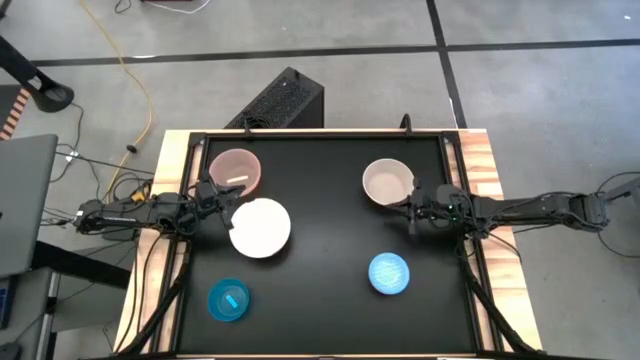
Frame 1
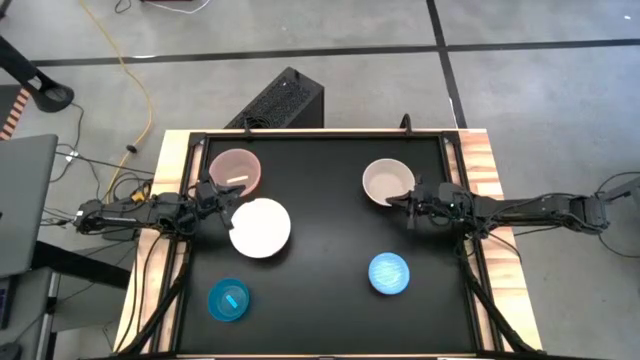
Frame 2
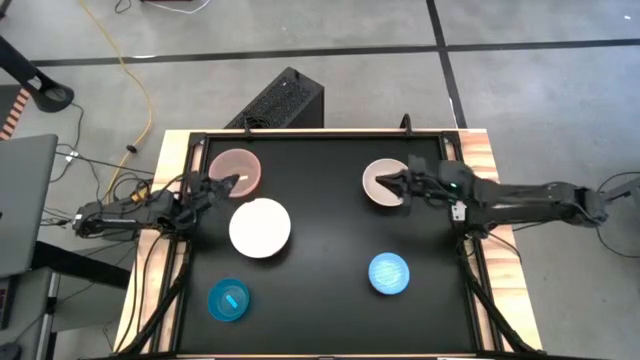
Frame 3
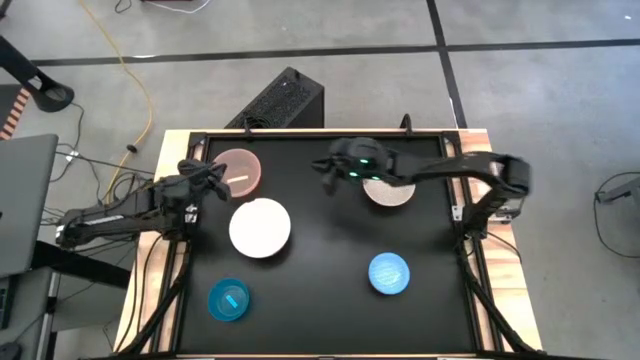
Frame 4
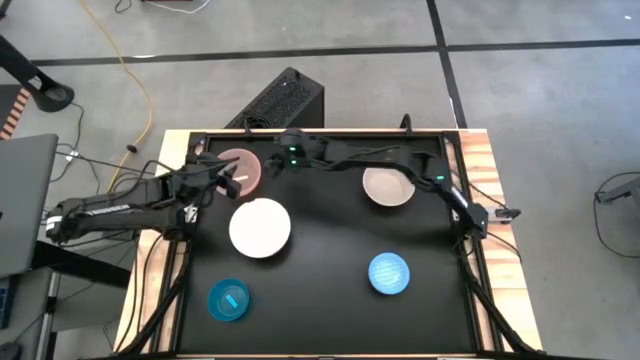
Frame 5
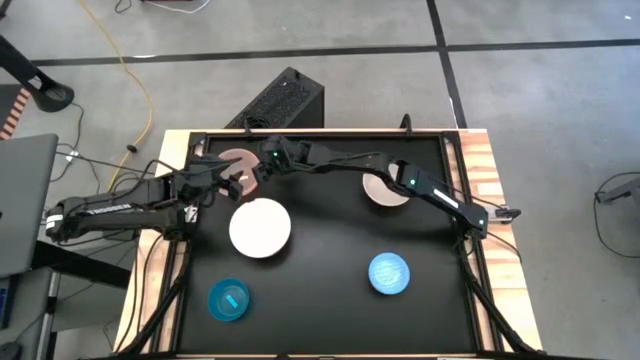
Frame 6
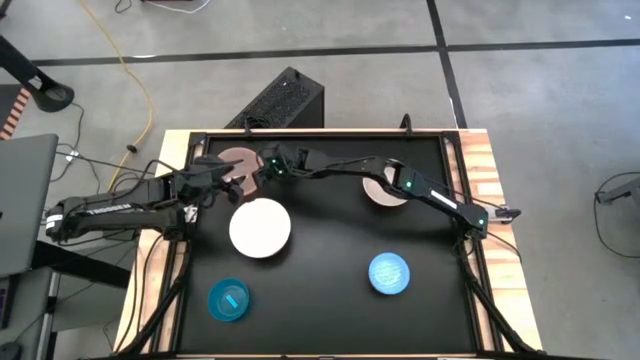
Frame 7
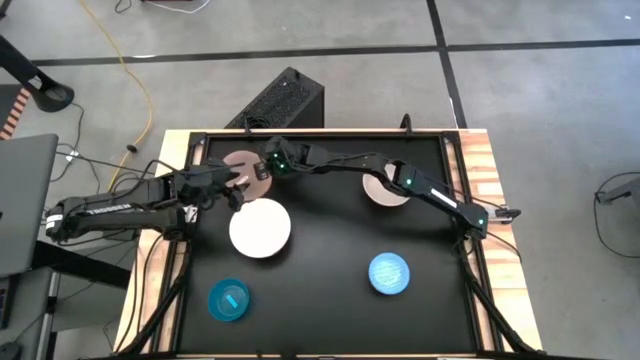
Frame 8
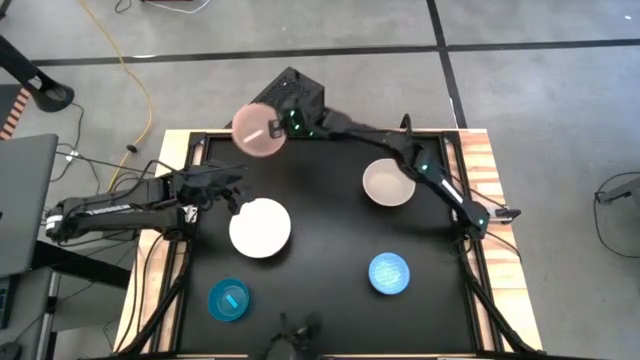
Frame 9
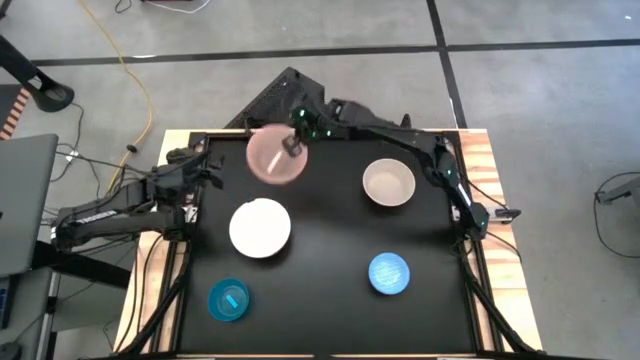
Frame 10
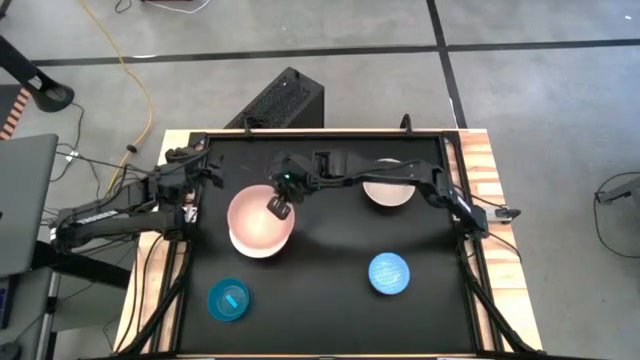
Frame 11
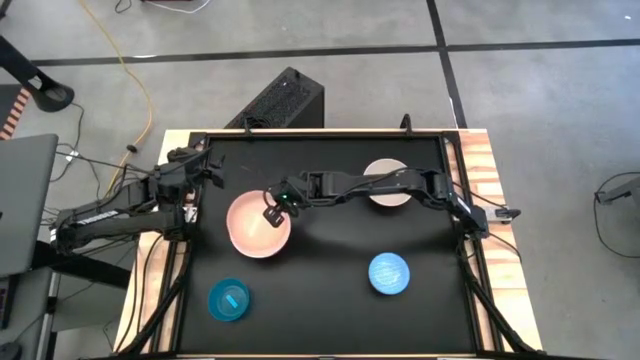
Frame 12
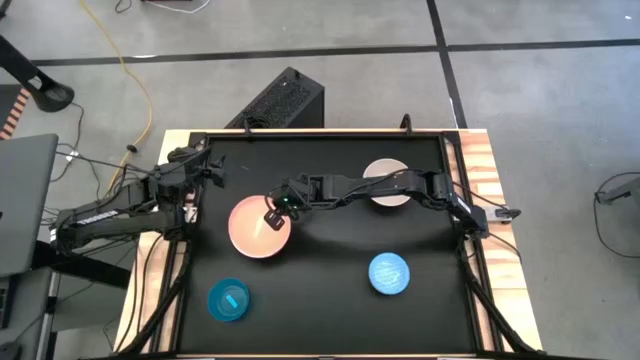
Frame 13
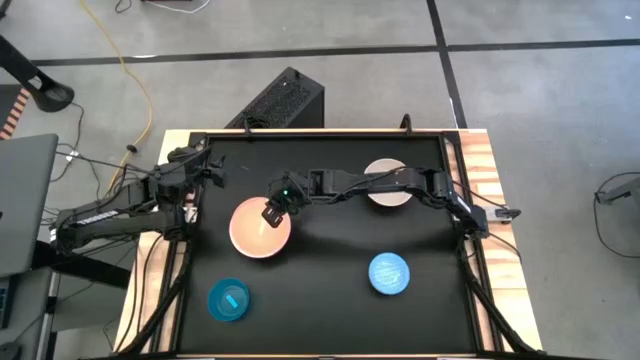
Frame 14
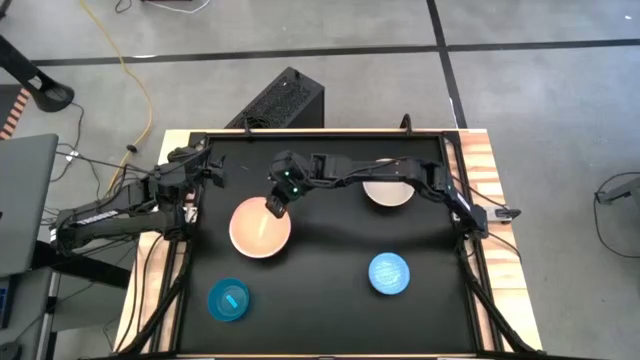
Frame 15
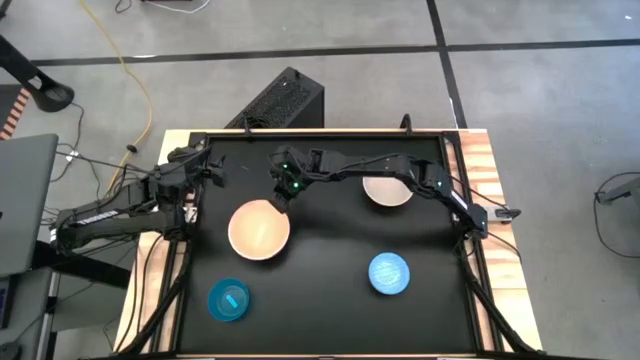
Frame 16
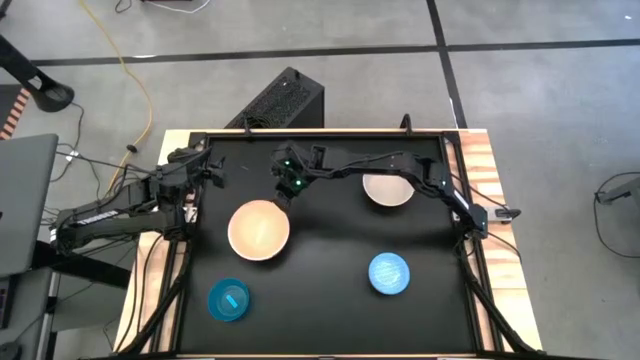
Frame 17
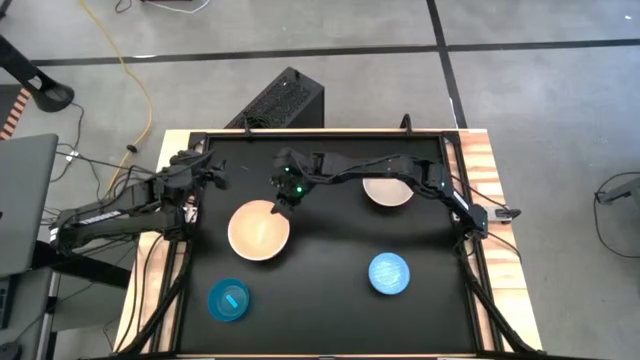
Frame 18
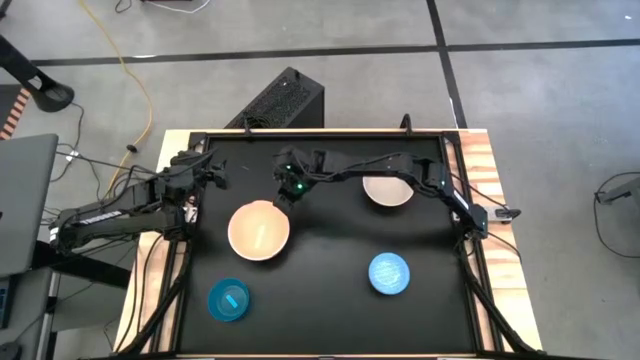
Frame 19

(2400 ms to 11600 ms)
Stack the pink bowl on top of the white bowl

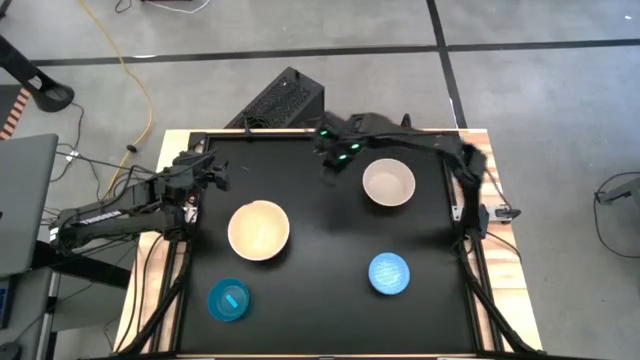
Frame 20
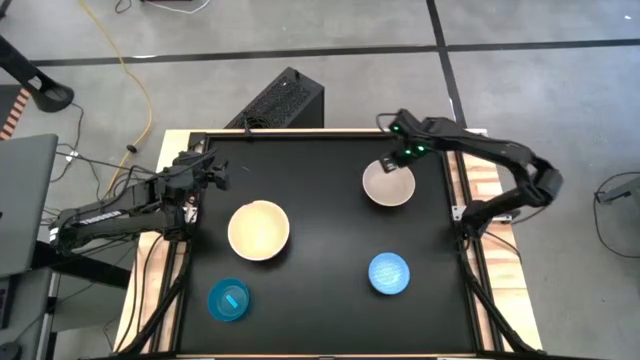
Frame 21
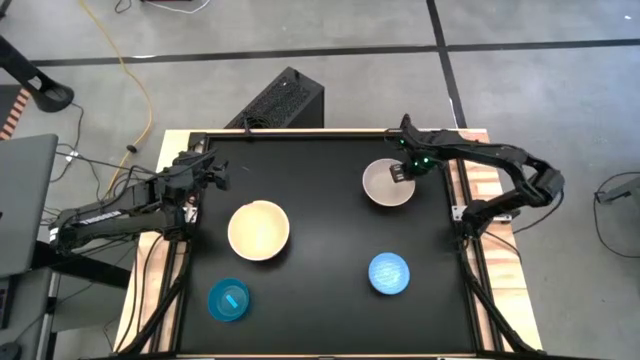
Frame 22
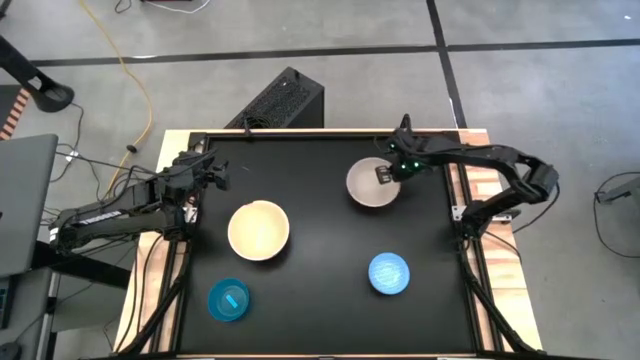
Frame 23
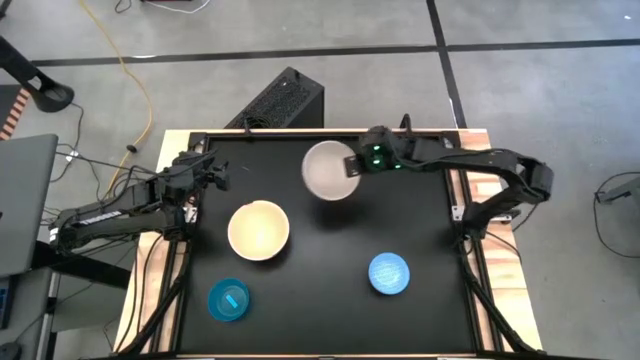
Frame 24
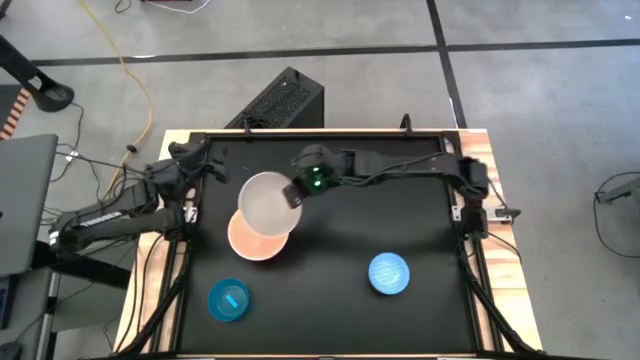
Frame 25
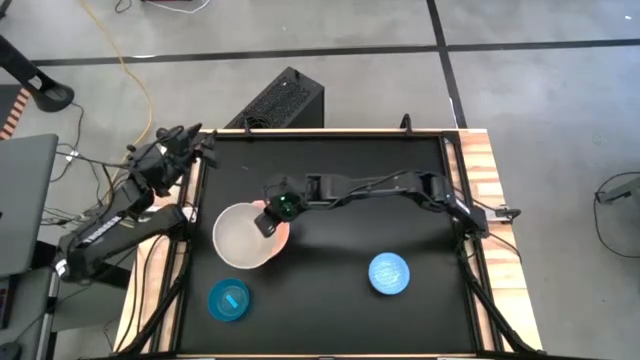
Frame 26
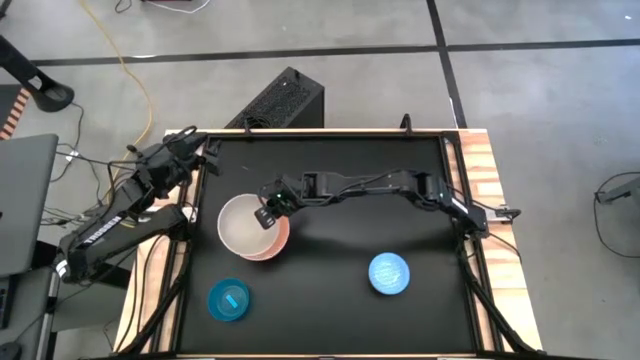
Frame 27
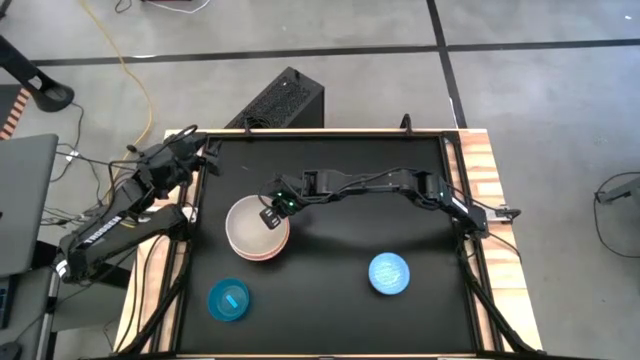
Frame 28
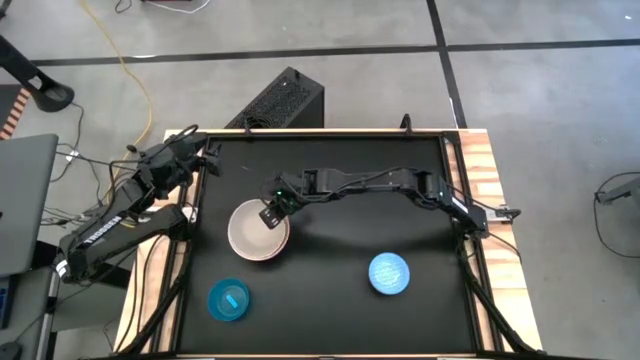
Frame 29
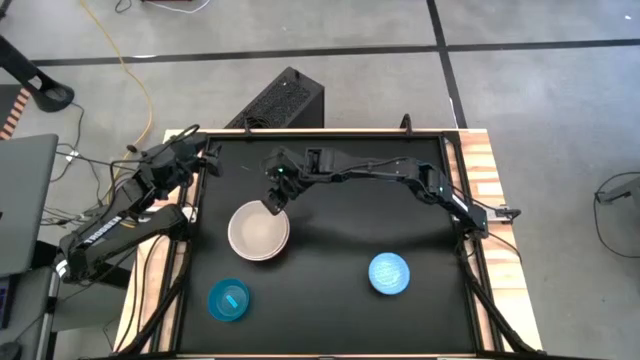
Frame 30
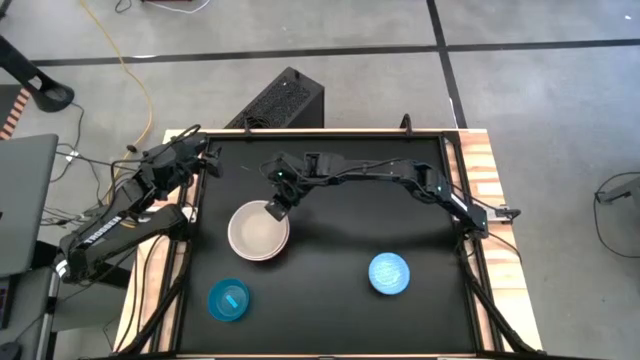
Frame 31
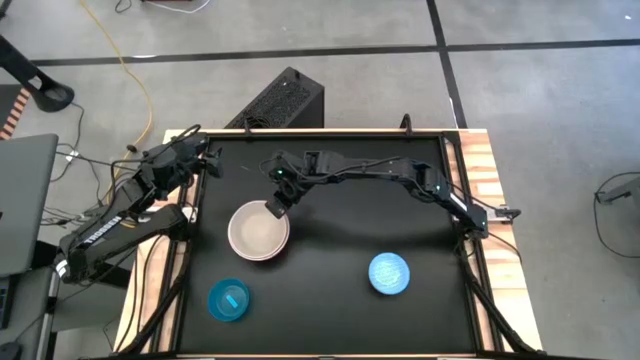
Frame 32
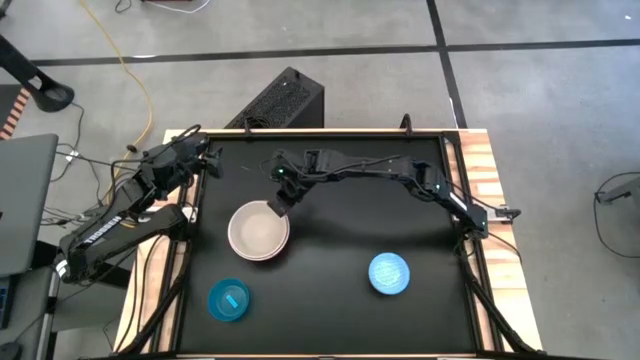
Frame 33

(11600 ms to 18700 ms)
Stack the light brown bowl on top of the pink bowl

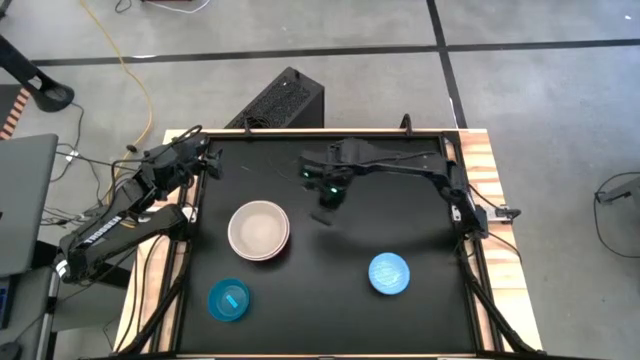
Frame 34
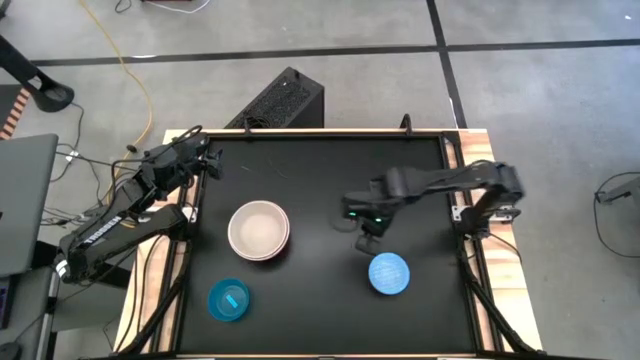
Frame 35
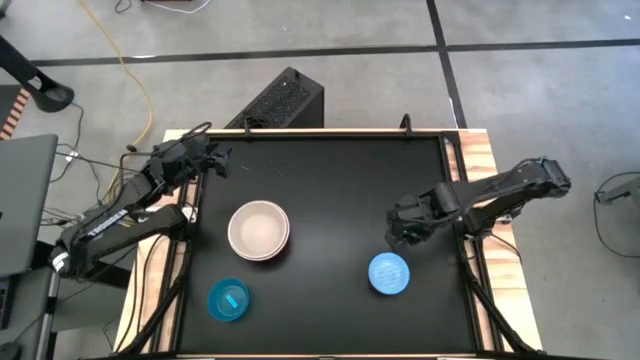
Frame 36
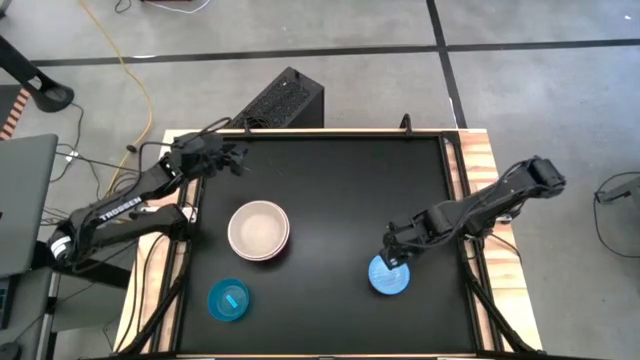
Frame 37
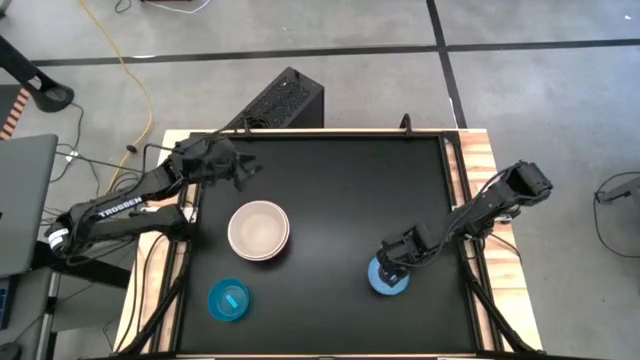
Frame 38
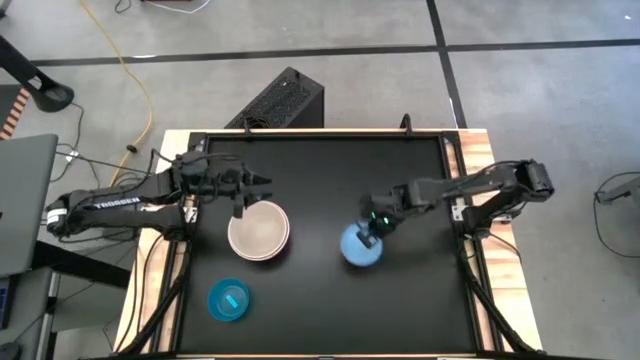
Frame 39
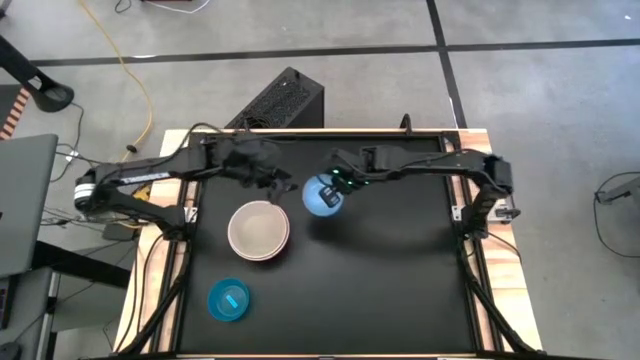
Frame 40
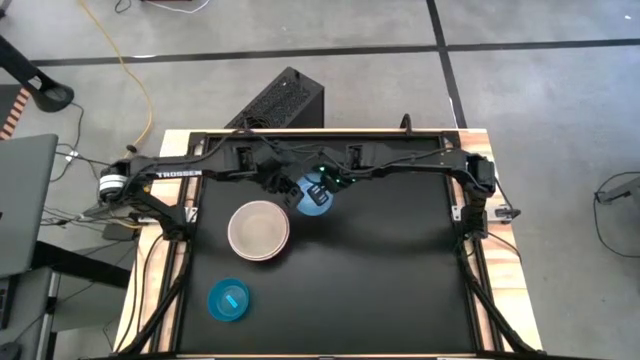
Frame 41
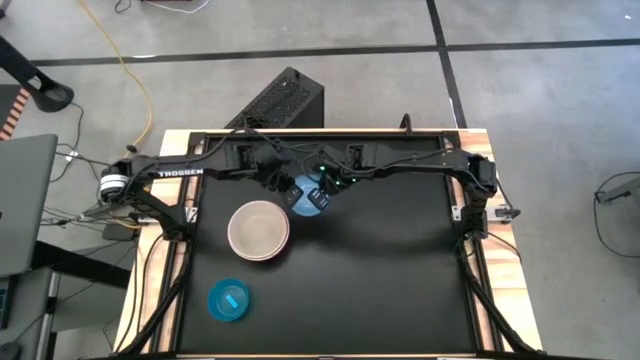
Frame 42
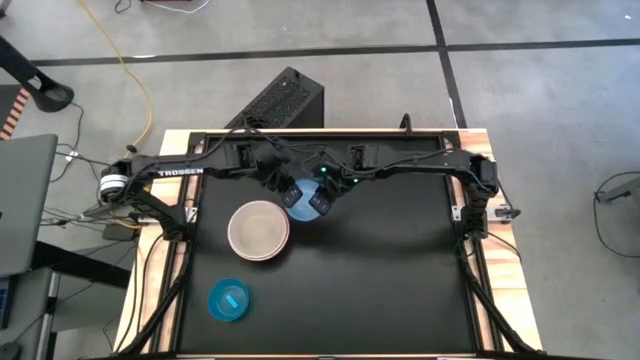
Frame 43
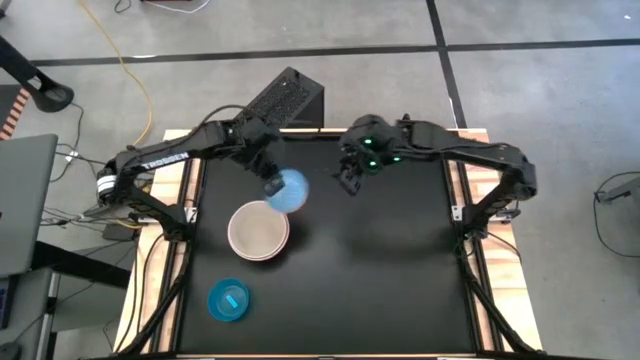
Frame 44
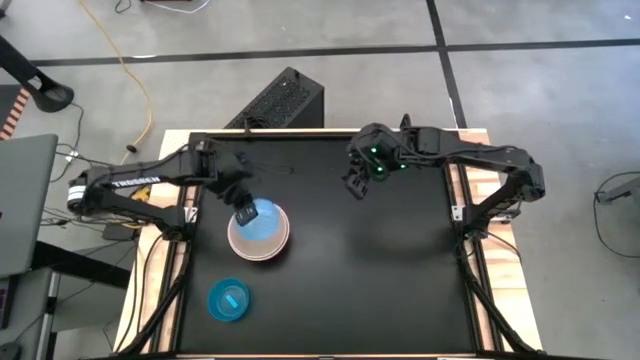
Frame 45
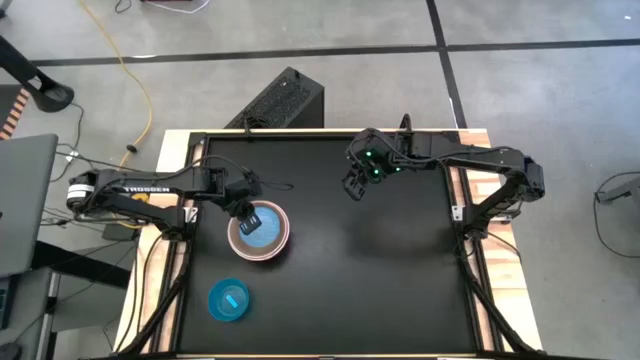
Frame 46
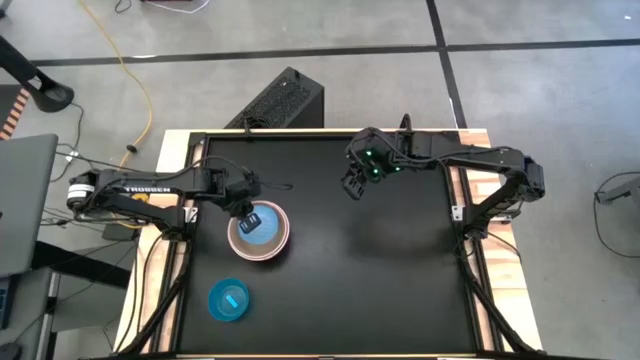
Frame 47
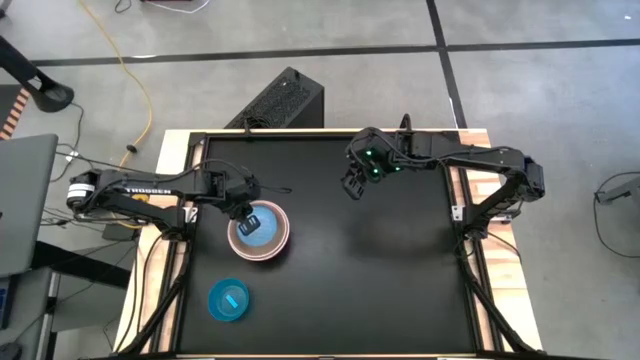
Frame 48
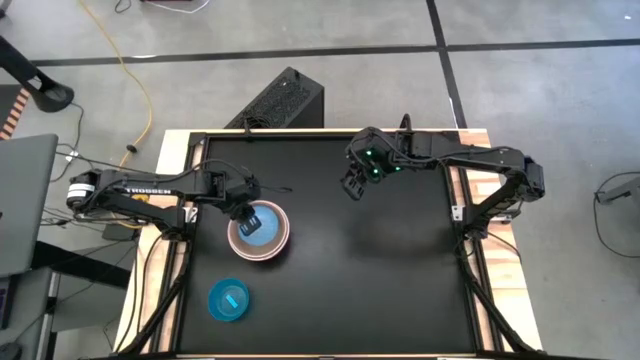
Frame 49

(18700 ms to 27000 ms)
Stack the blue patterned bowl on top of the light brown bowl
